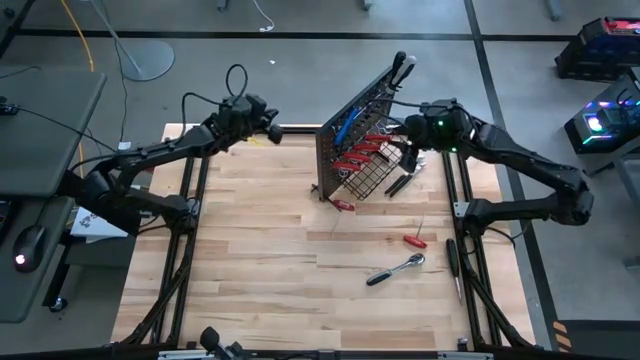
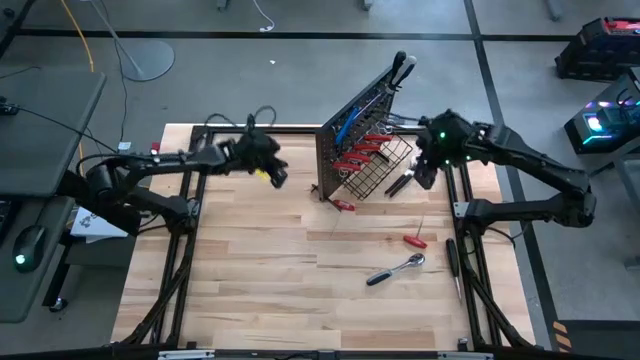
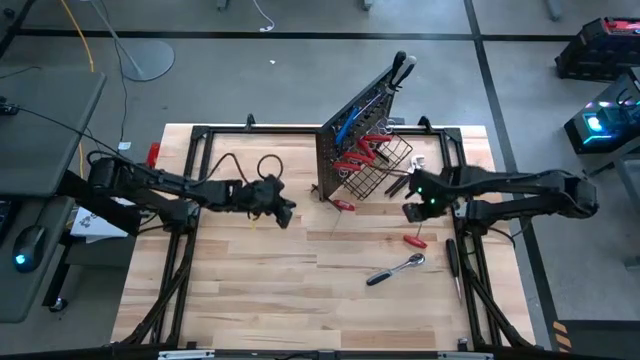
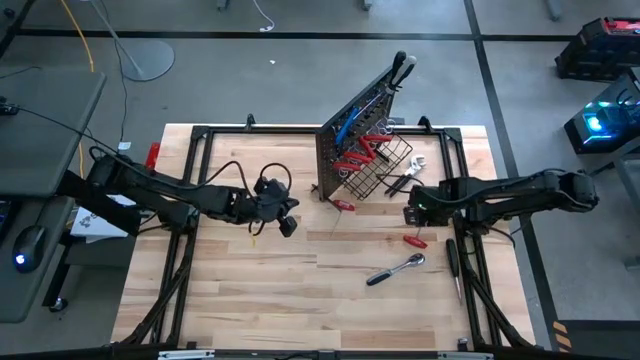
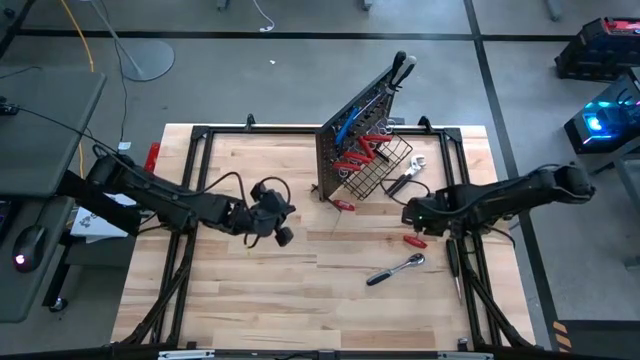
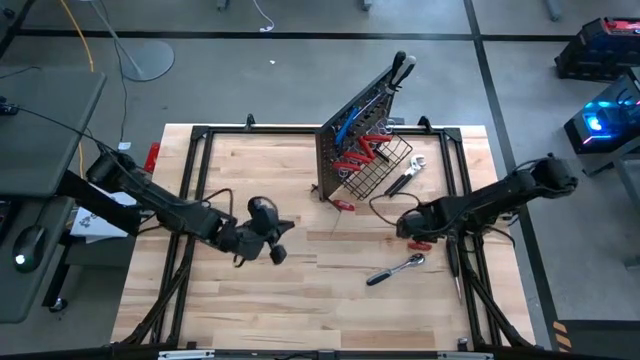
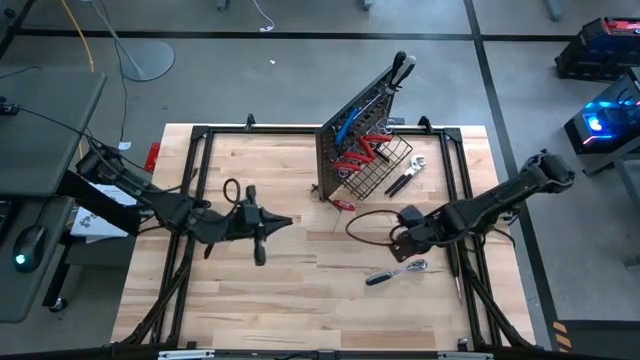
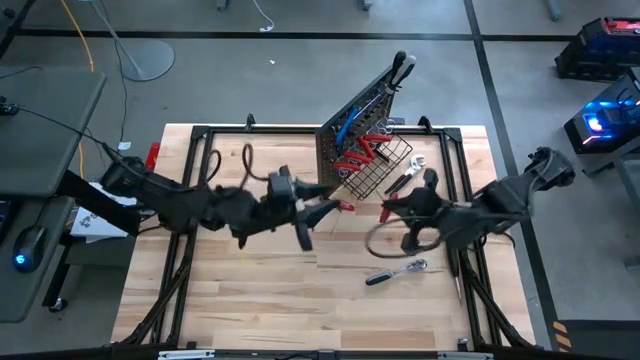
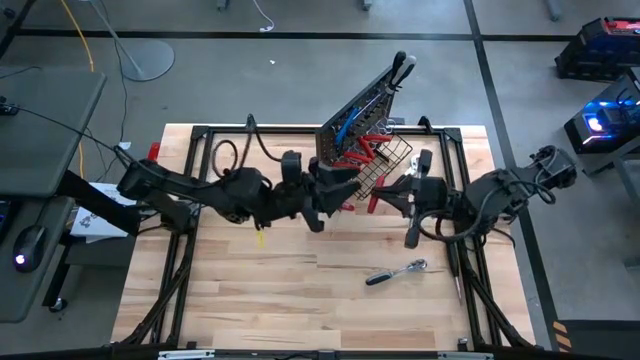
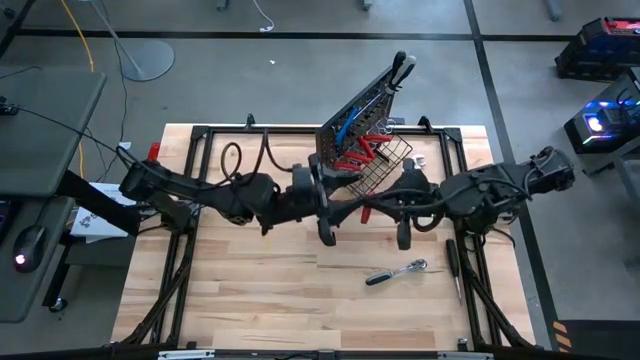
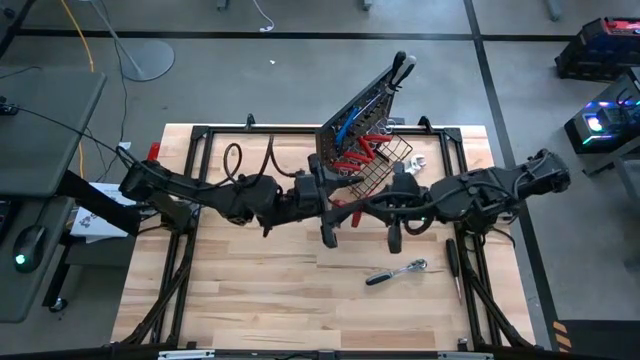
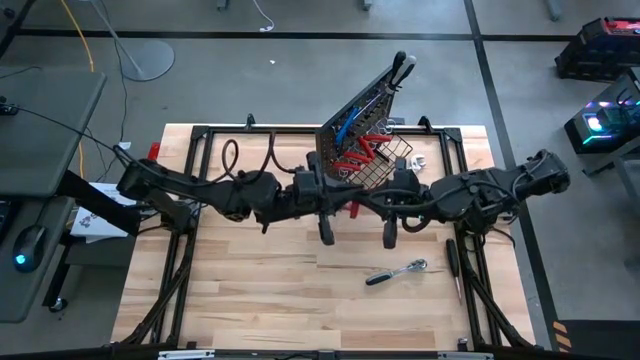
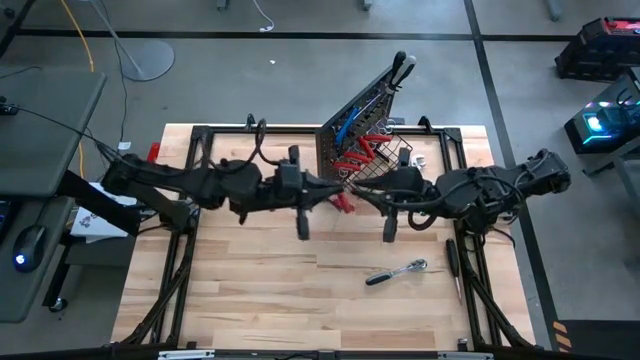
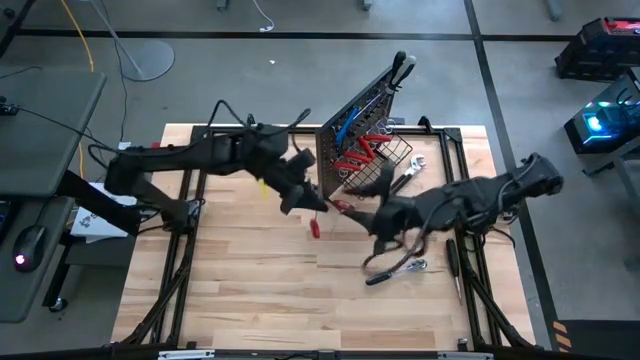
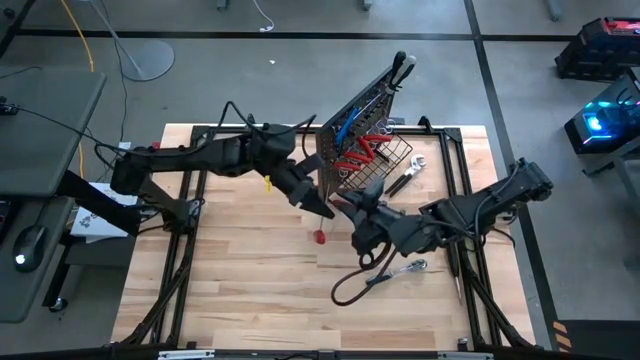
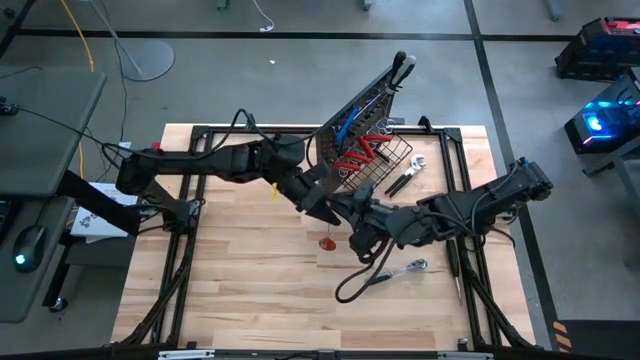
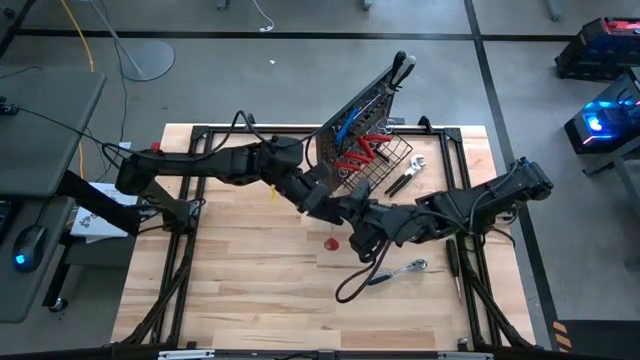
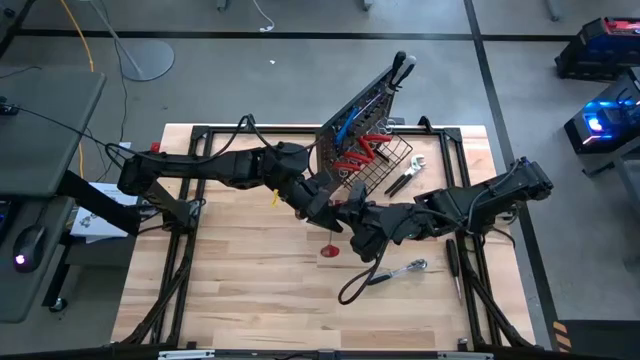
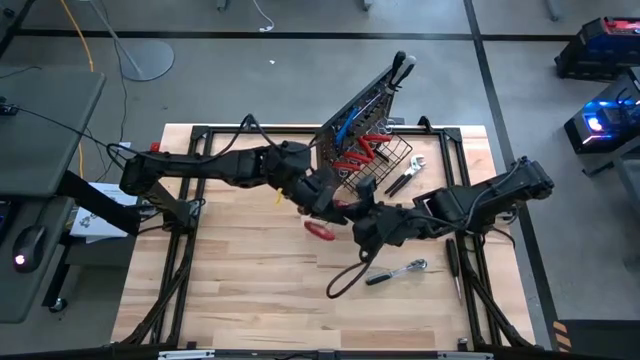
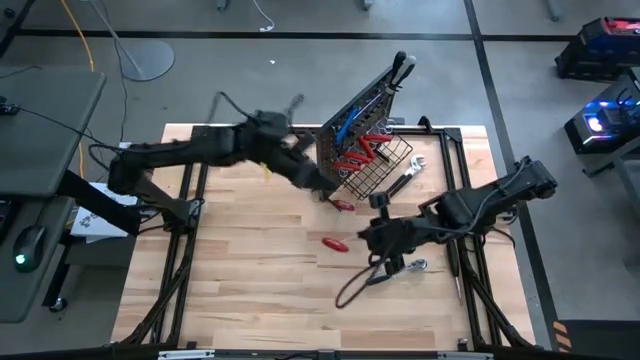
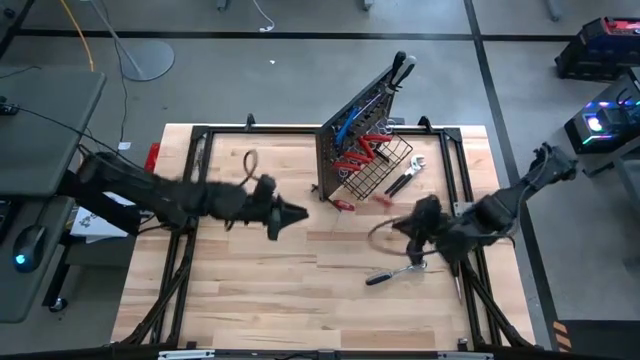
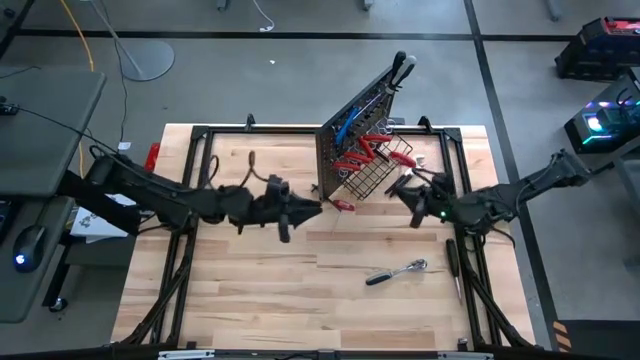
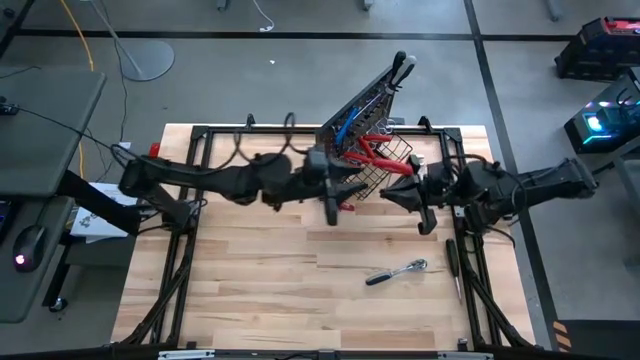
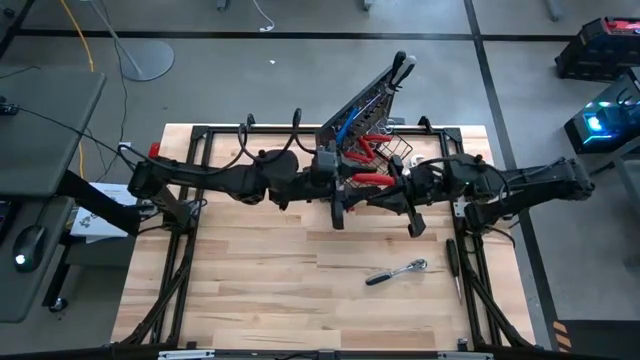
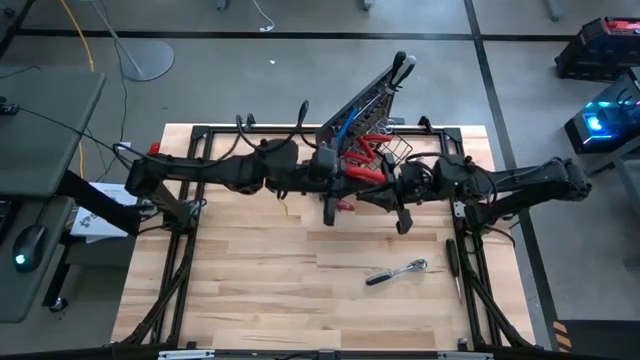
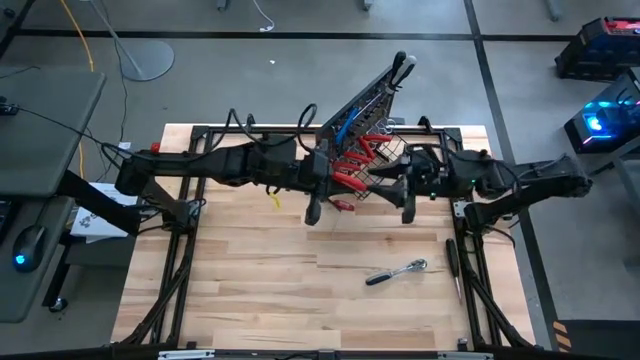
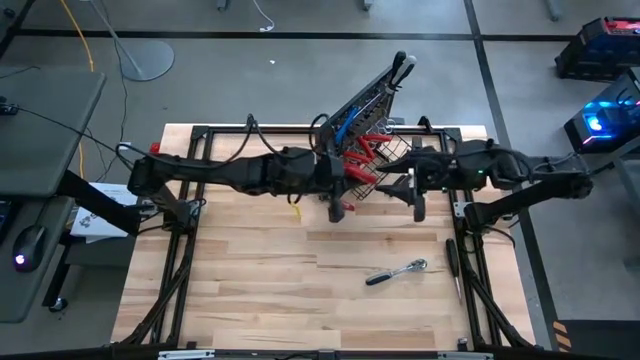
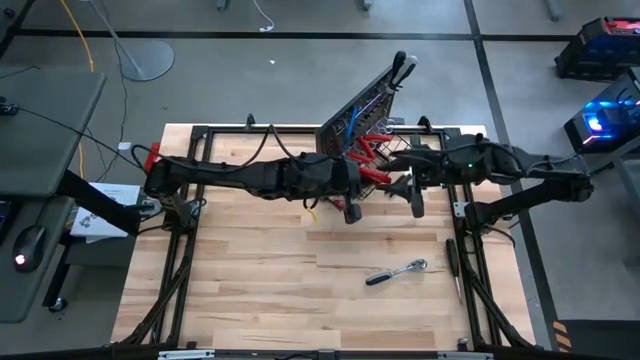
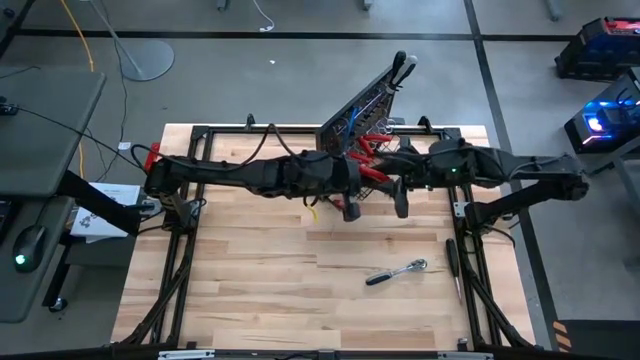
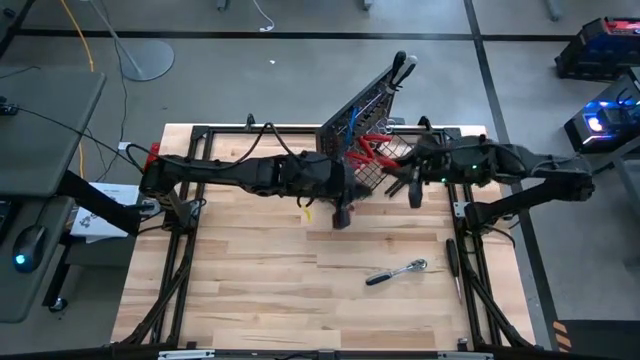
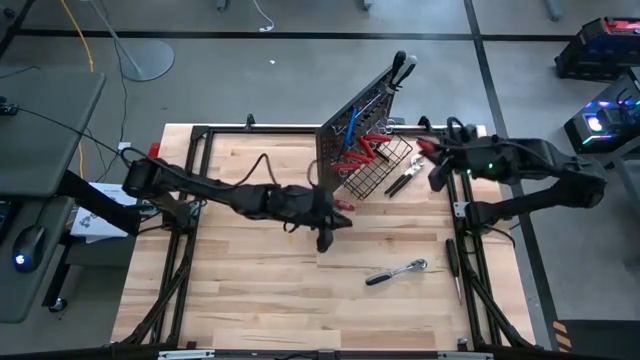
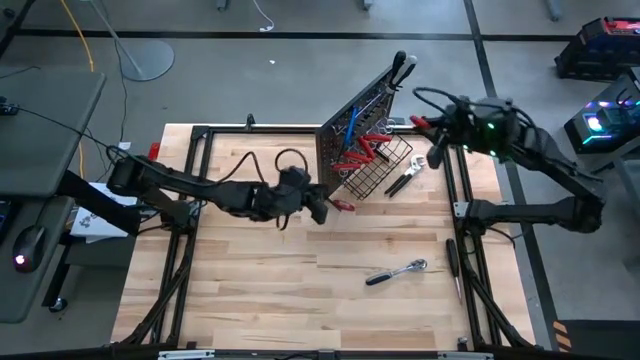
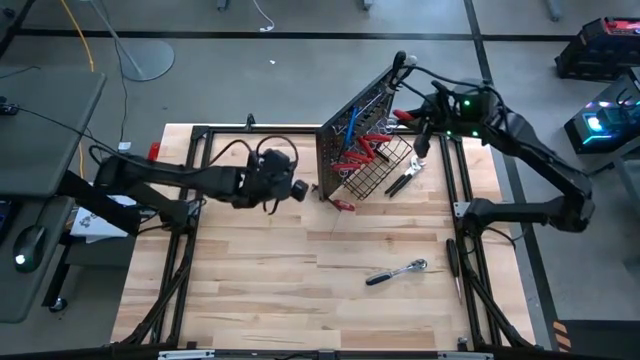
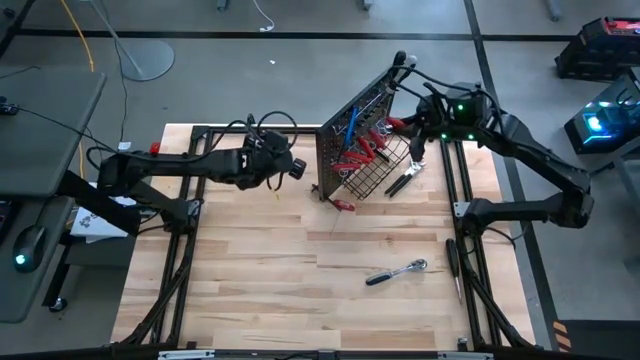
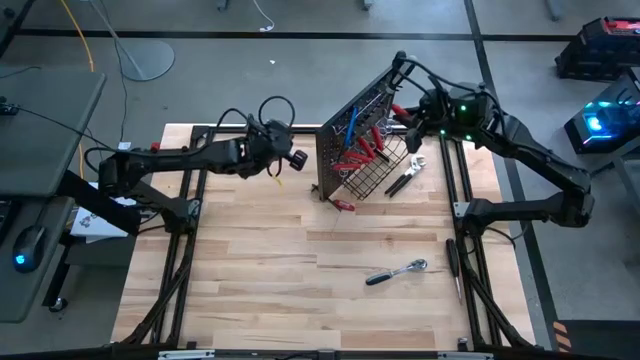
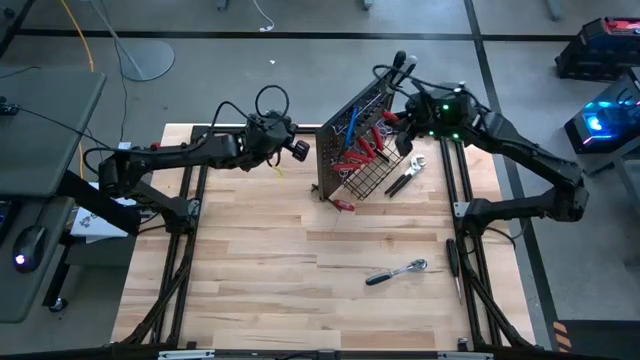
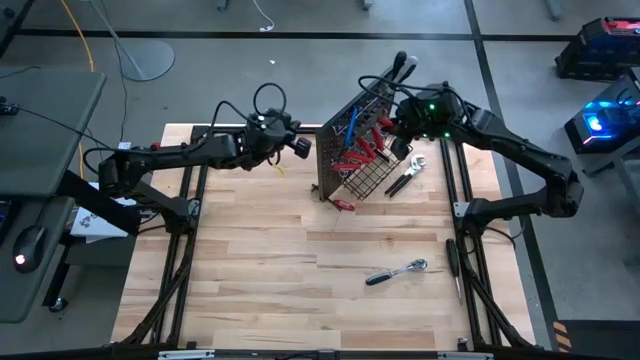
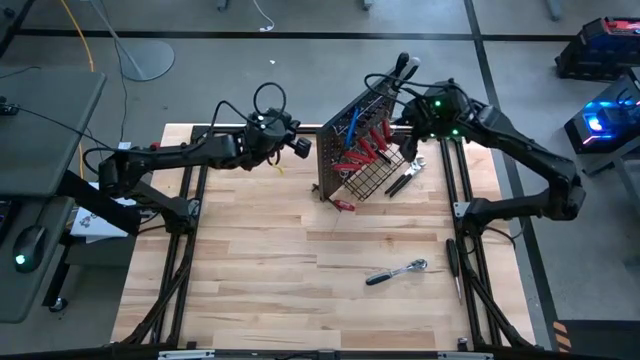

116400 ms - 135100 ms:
Task: Hang tools onto peg board
Hang the red allen wrench on the peg board

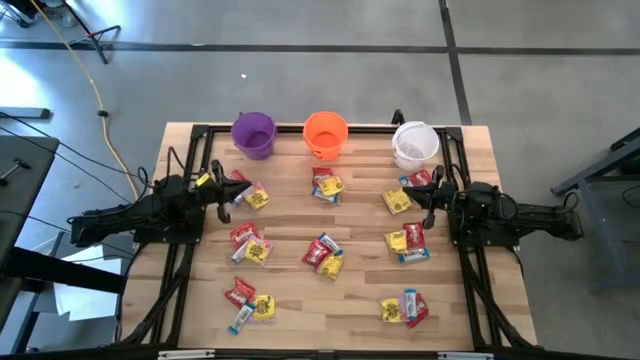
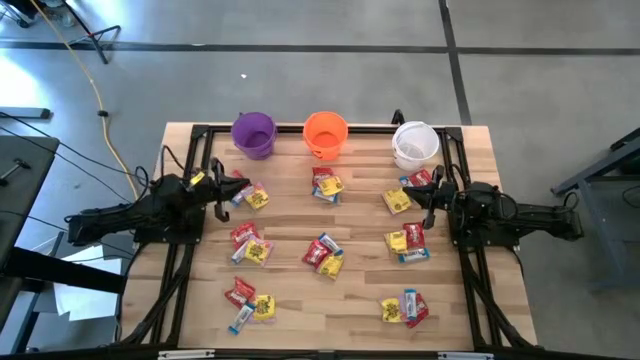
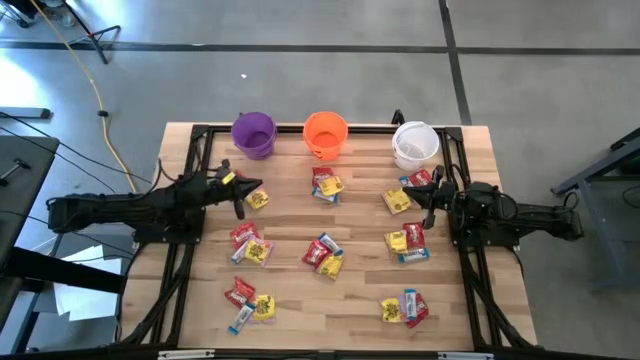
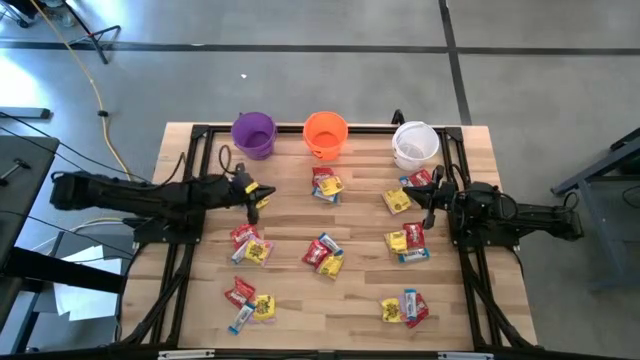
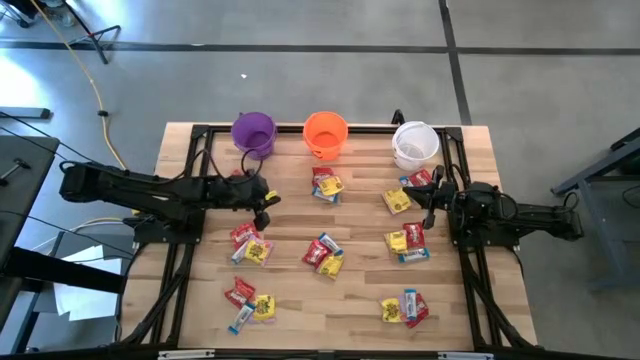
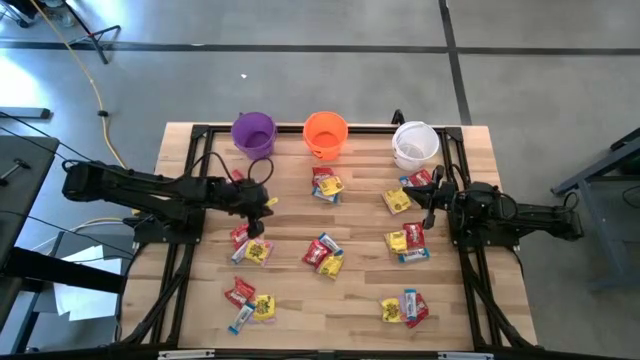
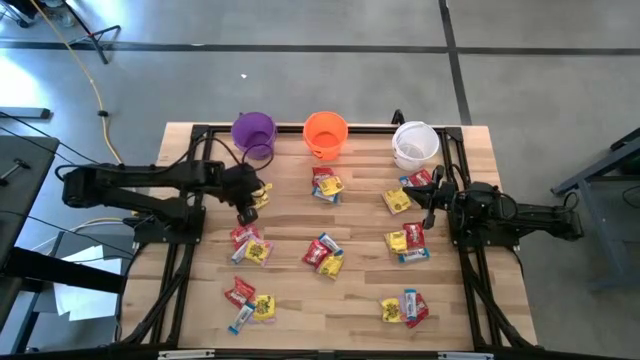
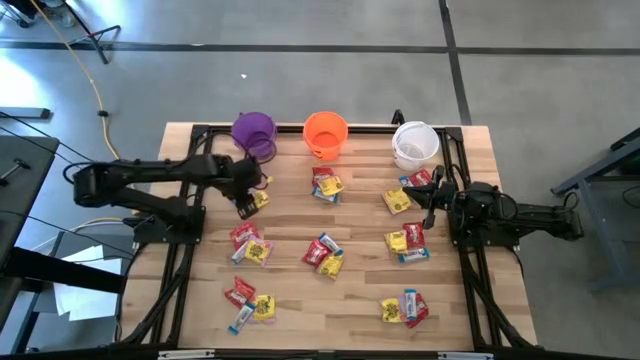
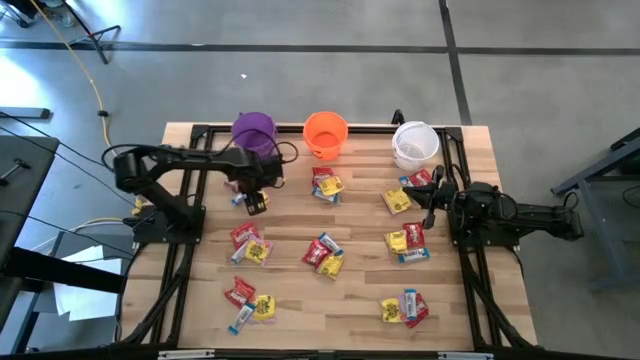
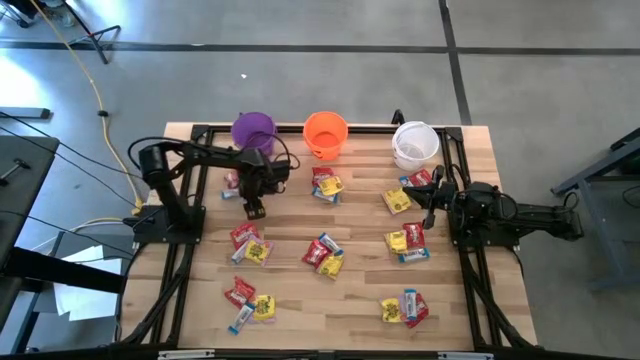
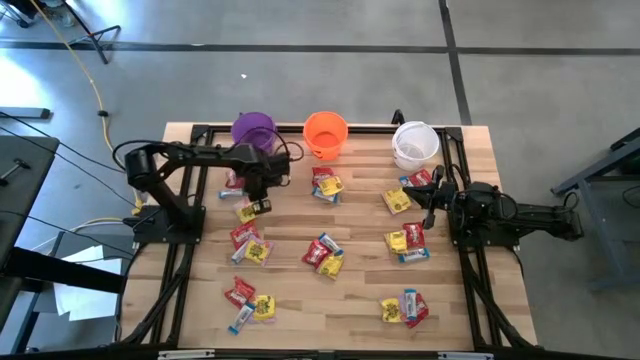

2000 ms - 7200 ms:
Task: Sort candy
Put the yellow candy into the orange bucket
